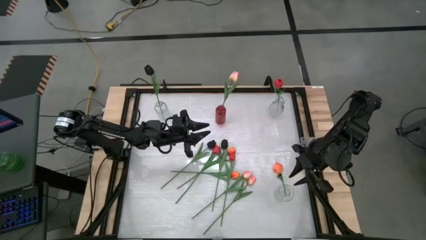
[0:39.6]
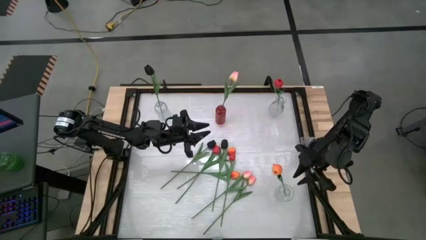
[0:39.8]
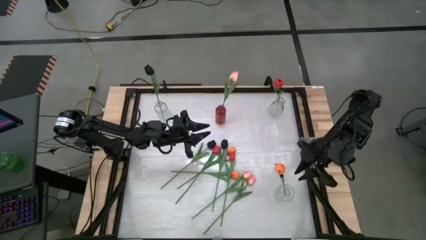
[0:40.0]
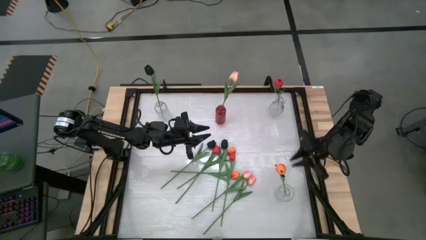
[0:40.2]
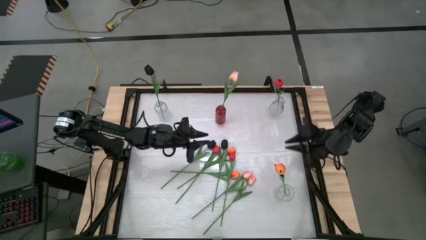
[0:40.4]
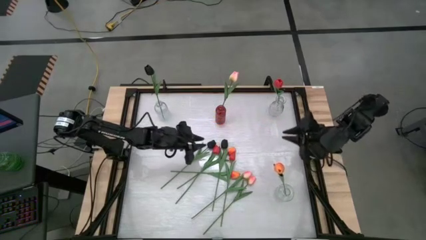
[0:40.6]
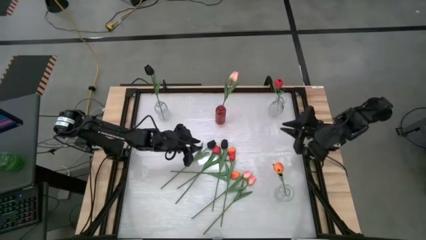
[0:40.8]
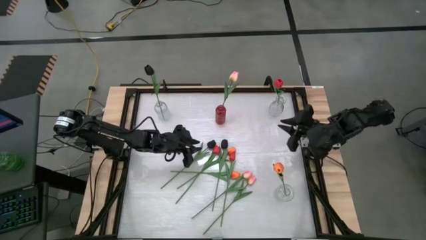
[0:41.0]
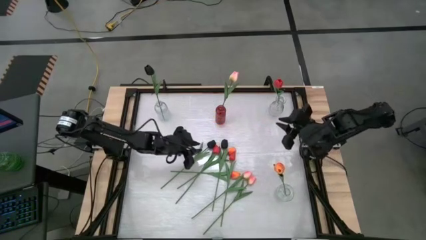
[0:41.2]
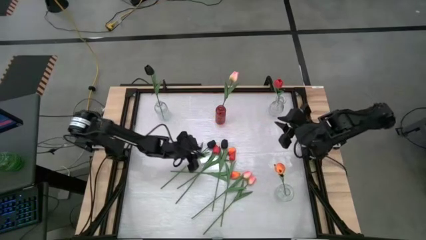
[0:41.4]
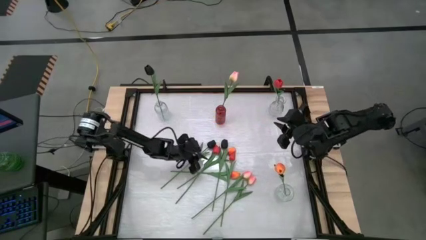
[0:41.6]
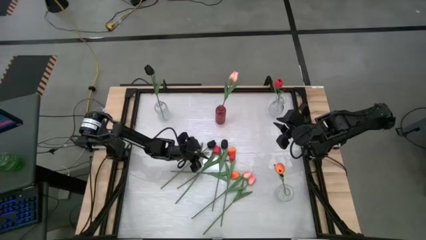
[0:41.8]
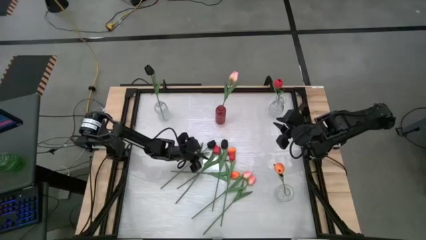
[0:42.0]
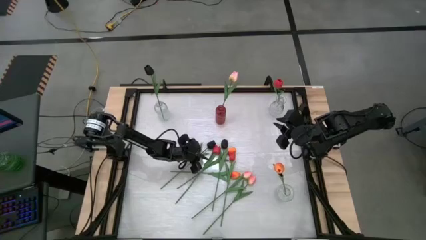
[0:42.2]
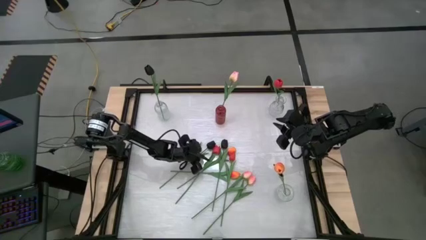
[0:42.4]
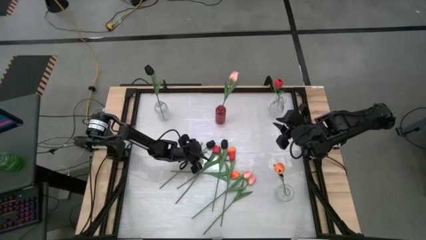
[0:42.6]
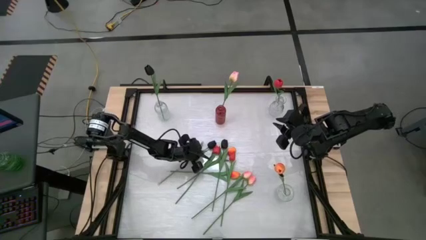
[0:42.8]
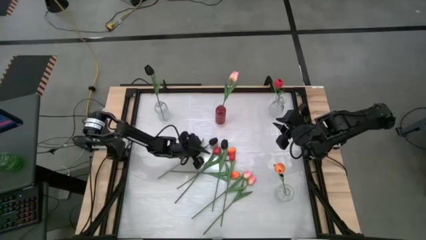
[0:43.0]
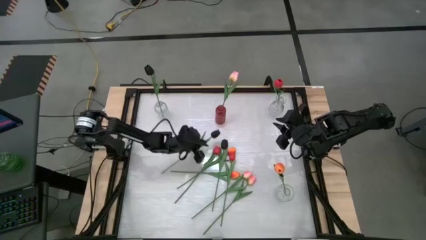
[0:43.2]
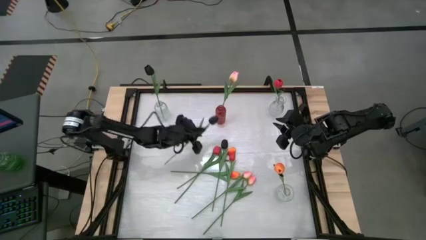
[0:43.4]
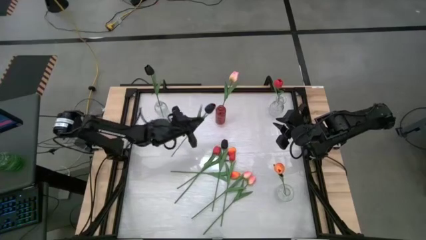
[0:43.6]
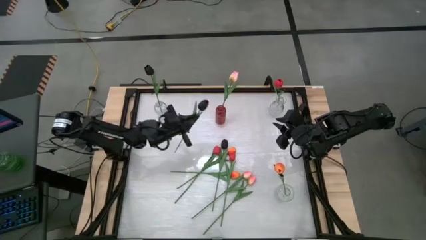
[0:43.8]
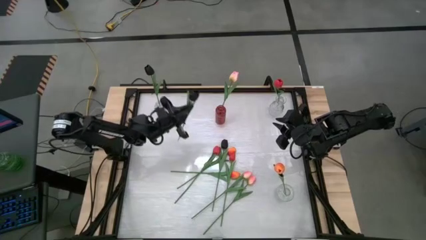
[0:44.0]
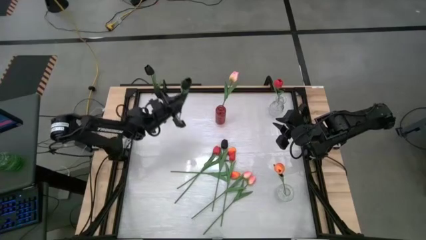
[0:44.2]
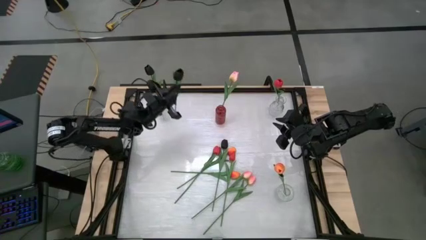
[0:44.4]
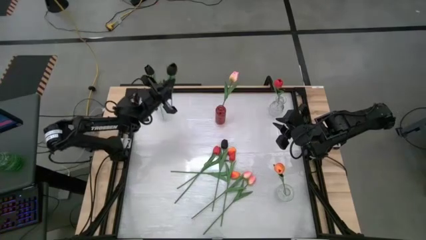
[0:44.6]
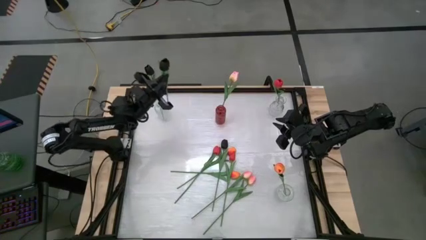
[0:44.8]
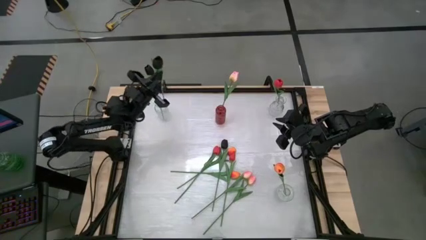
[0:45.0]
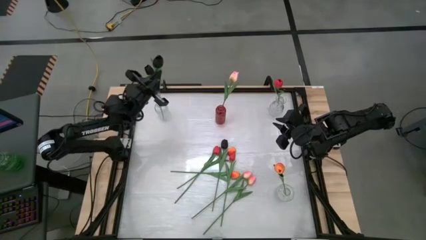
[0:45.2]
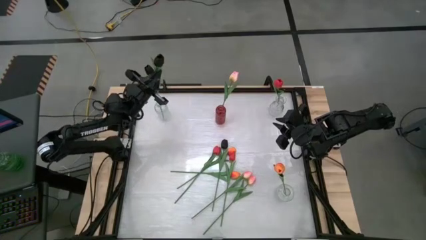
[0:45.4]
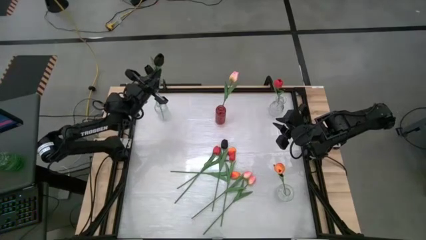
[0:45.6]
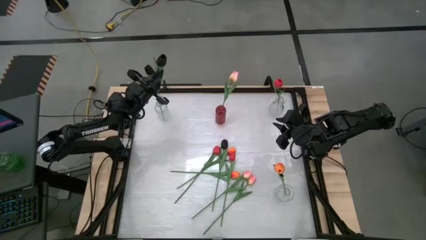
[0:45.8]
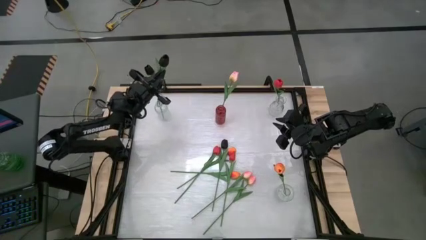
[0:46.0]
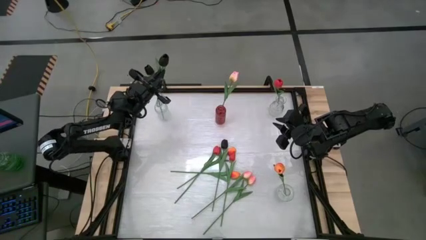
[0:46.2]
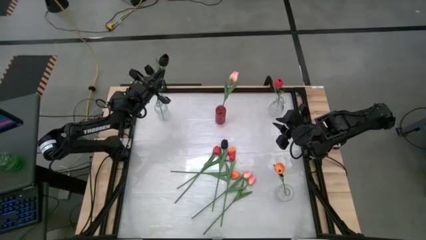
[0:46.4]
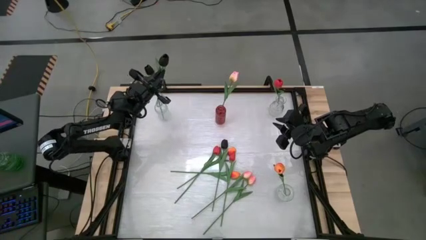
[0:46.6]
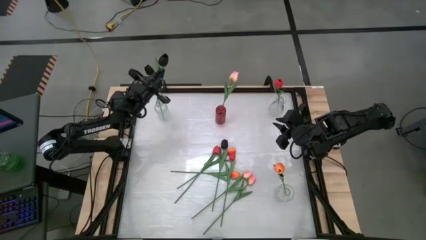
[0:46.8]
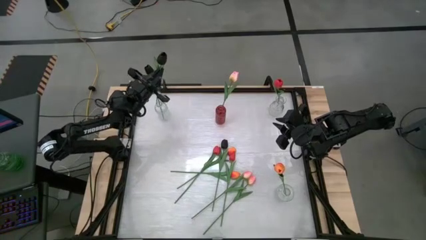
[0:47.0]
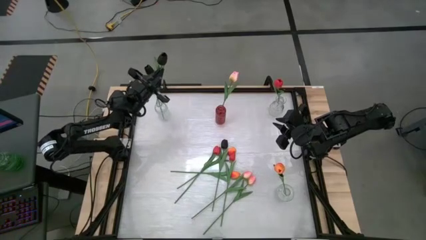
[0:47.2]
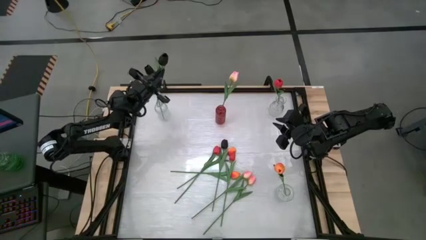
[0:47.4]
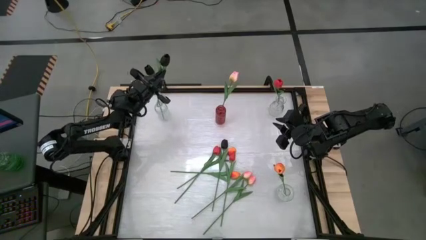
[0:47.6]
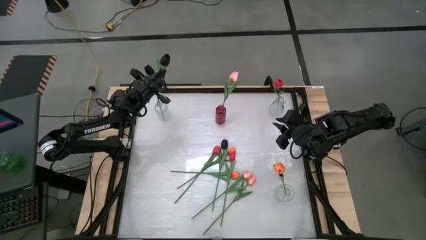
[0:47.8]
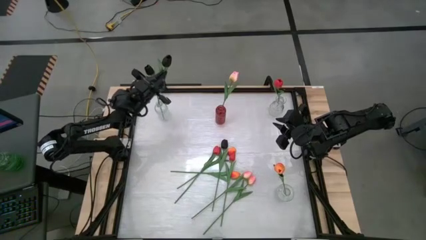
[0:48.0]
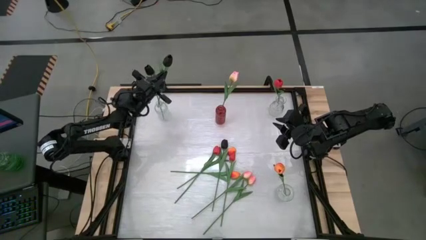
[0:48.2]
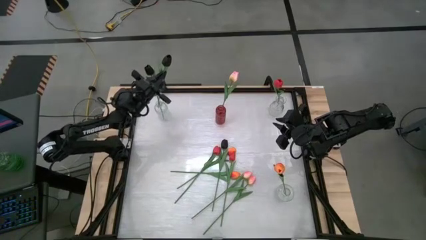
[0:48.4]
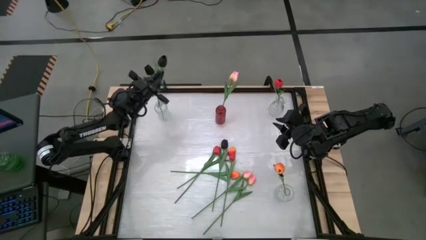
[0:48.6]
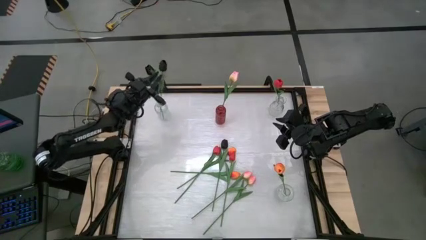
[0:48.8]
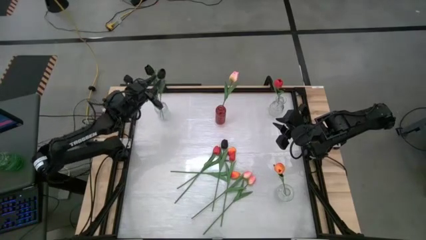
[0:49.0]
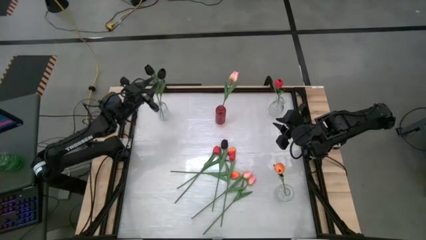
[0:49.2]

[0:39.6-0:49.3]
Task: Sort flowers into vase by color
Put the left black flower into the top left transparent vase

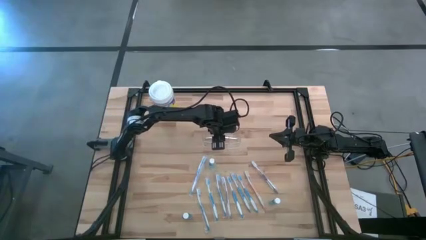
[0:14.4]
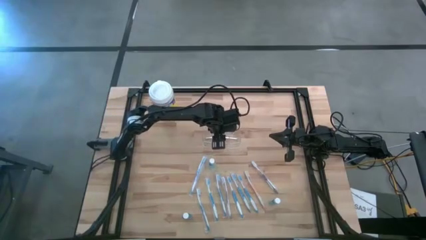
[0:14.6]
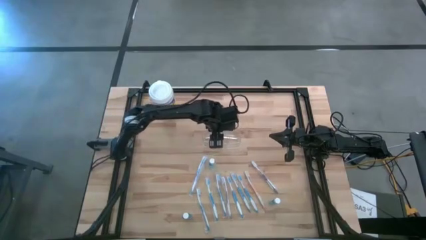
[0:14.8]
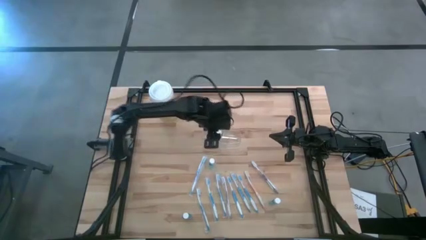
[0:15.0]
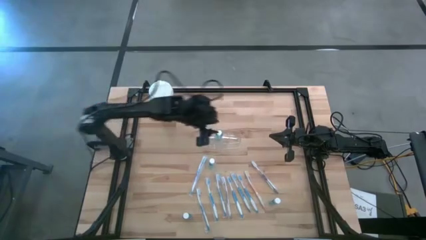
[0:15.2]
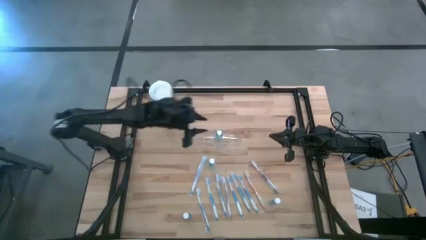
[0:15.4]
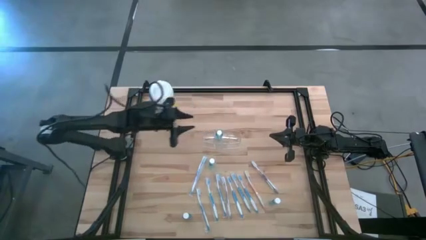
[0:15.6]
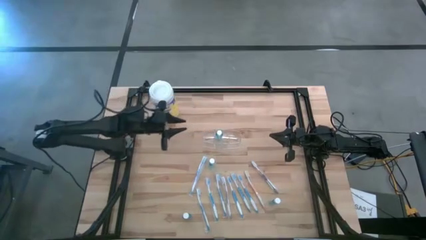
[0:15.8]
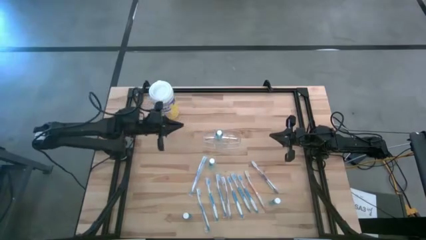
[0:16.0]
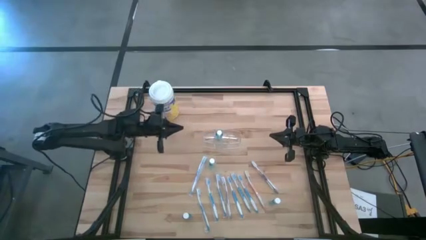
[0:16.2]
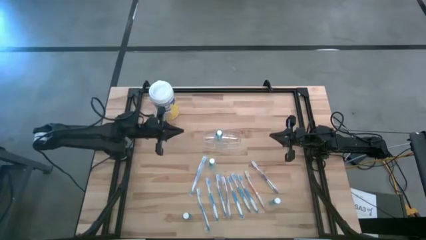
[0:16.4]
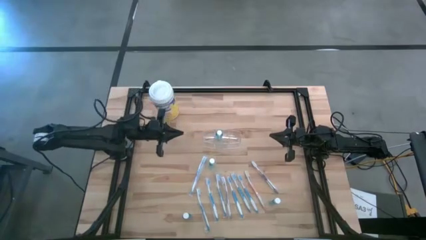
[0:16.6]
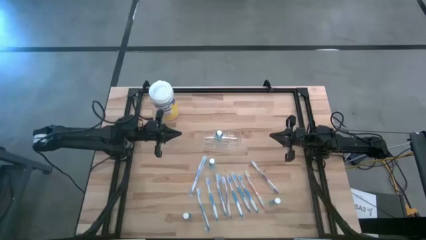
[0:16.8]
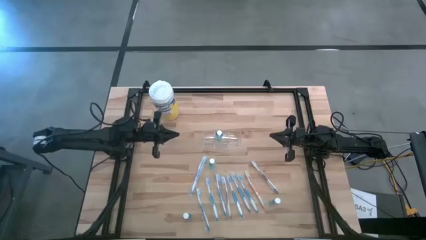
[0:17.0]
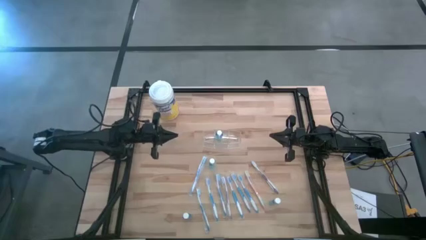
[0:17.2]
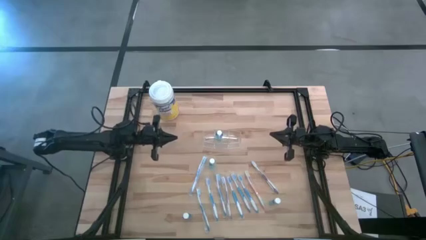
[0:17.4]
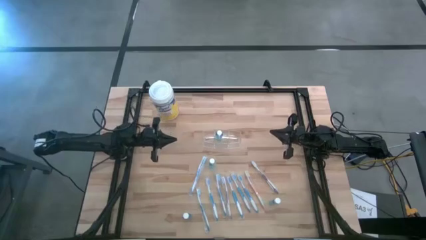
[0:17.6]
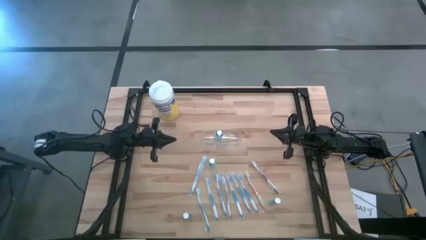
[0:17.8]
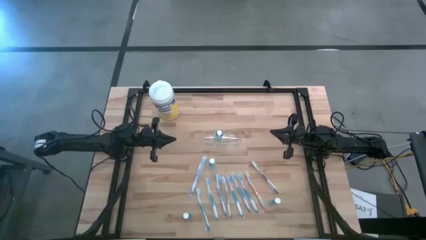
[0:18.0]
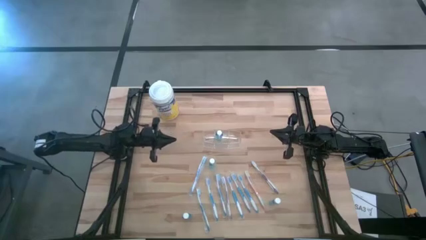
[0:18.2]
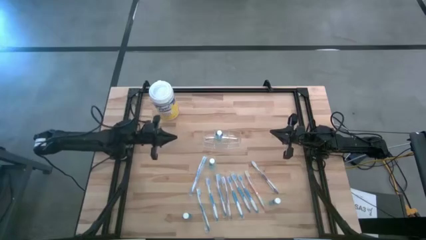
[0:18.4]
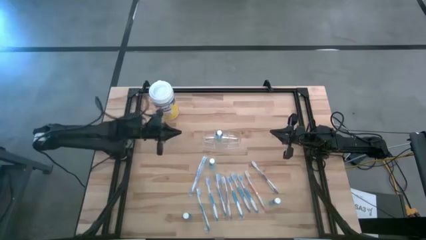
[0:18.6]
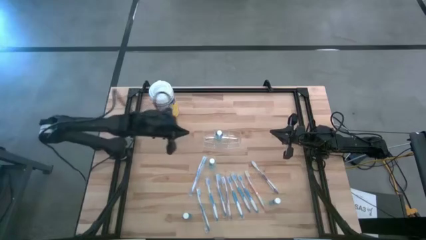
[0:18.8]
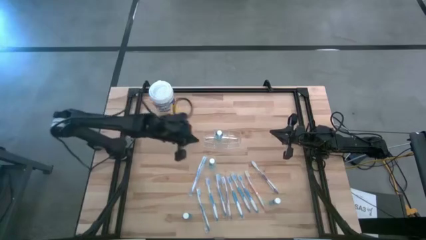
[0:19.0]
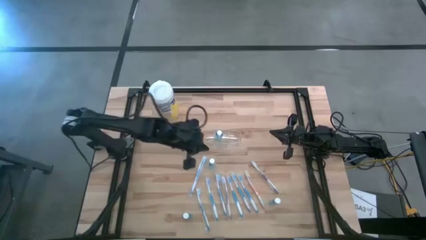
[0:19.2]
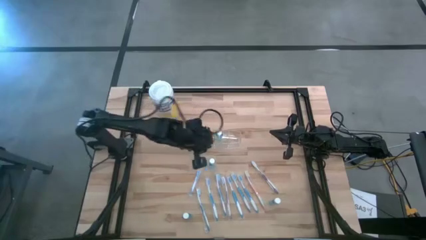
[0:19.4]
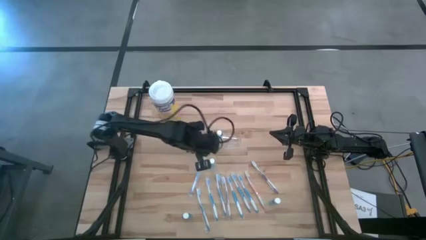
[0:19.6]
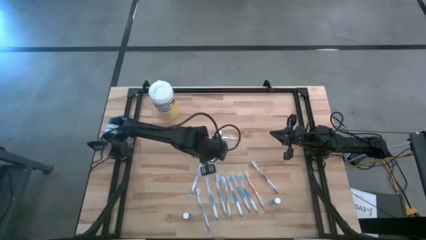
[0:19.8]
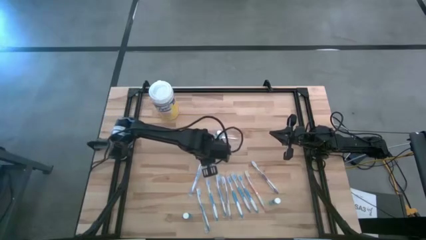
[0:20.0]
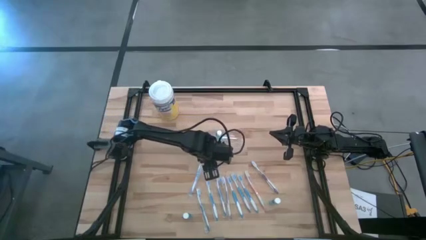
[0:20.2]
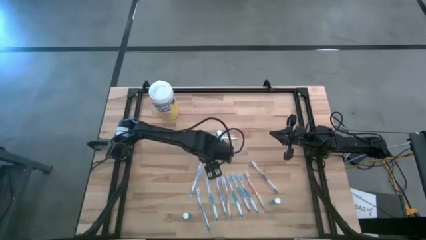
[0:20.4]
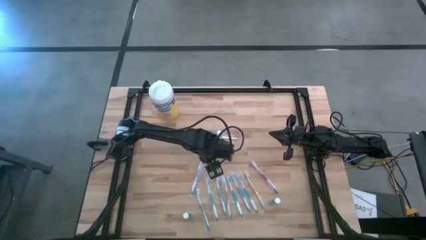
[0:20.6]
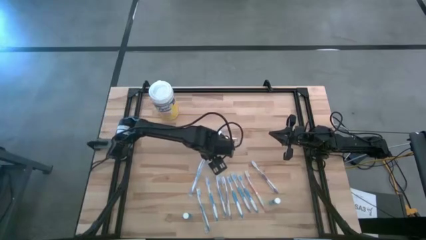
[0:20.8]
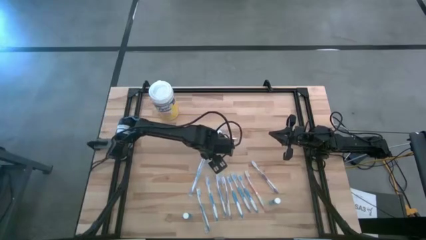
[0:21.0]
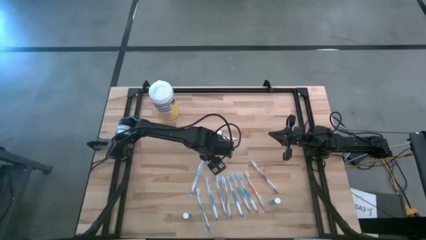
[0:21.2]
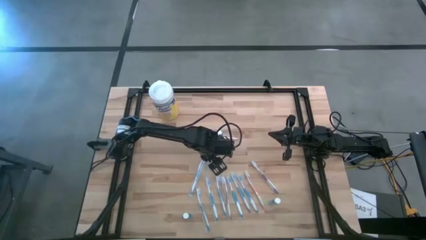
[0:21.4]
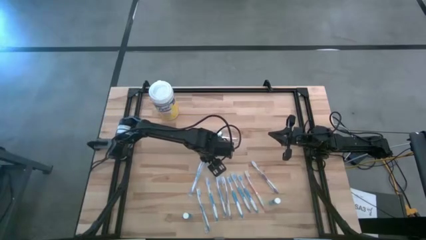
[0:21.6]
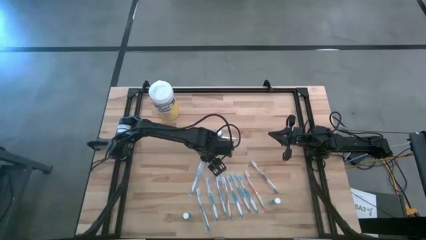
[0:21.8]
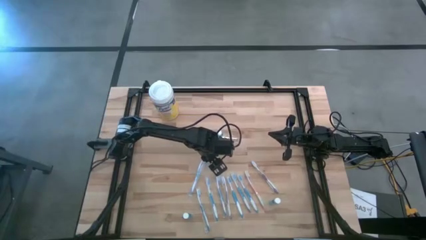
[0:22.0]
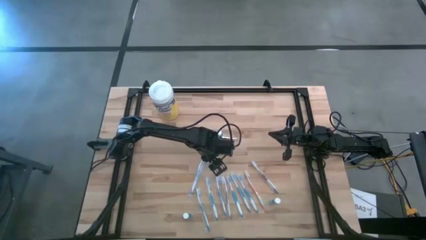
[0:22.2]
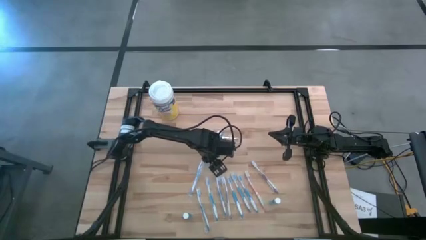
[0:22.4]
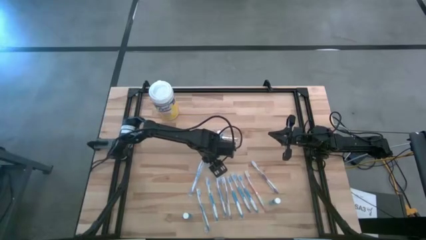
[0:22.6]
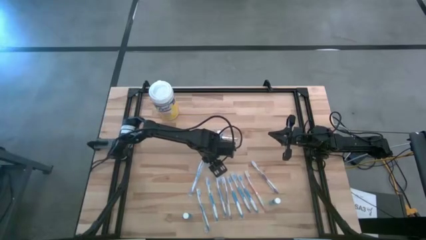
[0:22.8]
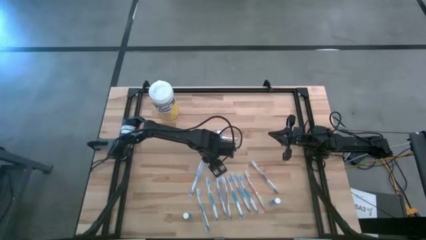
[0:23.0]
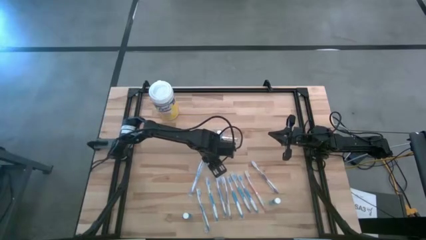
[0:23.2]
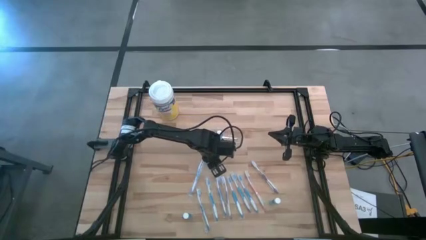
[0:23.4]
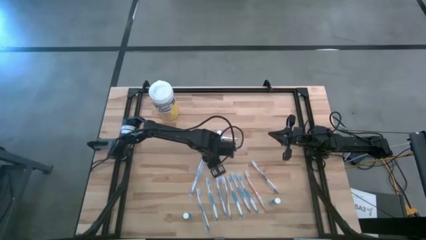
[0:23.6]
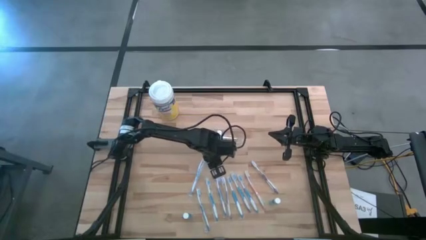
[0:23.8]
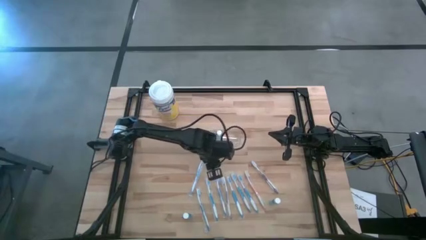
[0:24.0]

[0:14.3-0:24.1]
Task: Pick & Place toothbrushing station
Put the blue mouthwash bottle into the middle section of the transparent organizer
